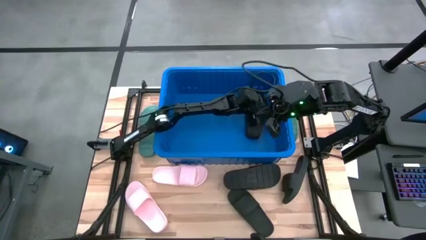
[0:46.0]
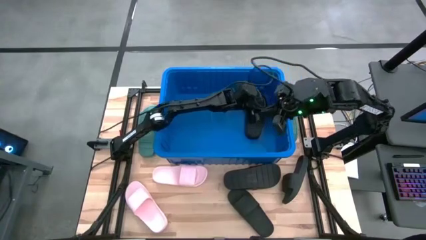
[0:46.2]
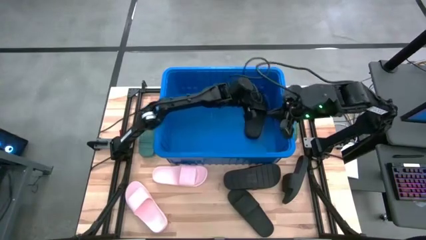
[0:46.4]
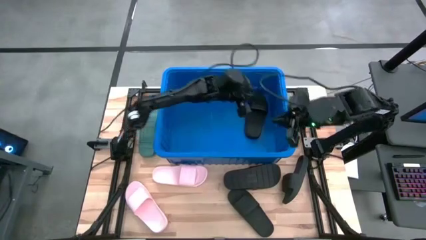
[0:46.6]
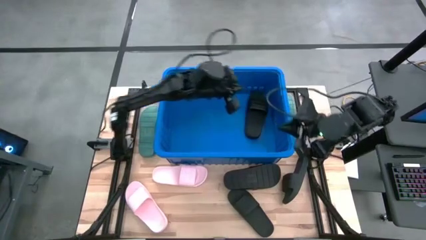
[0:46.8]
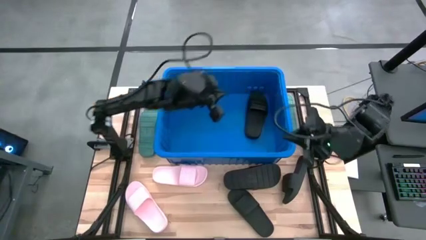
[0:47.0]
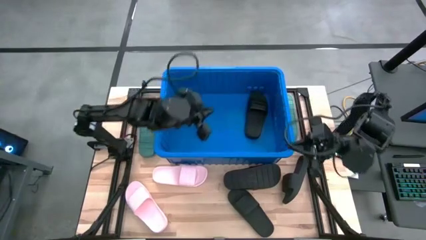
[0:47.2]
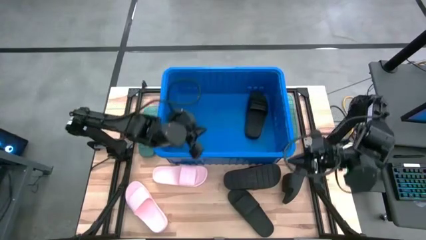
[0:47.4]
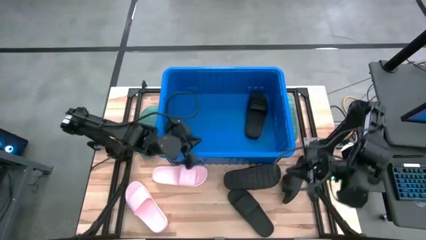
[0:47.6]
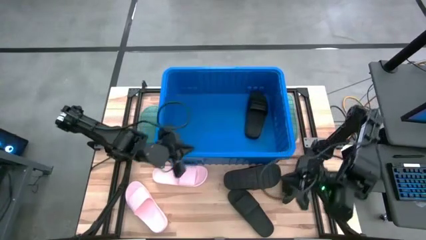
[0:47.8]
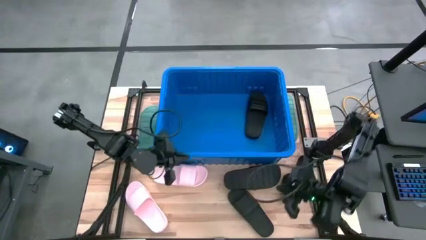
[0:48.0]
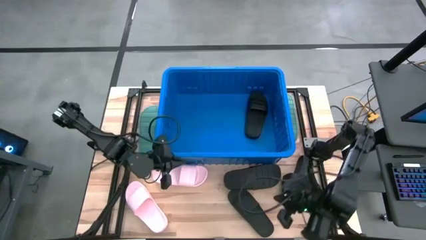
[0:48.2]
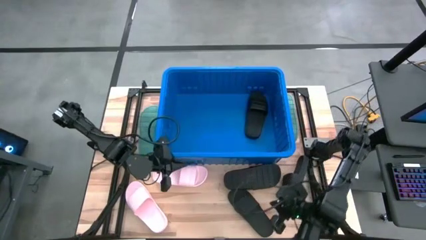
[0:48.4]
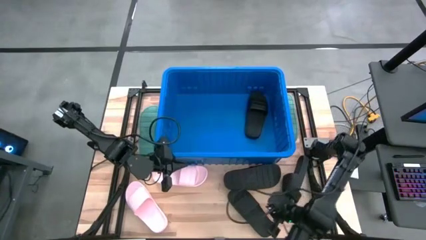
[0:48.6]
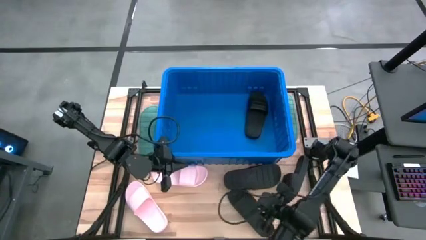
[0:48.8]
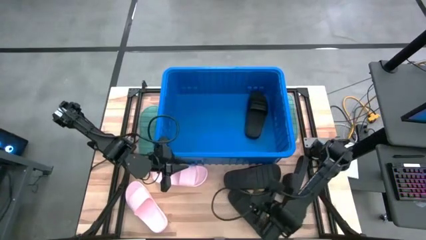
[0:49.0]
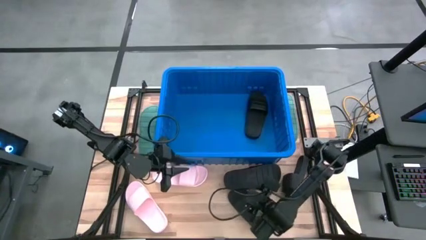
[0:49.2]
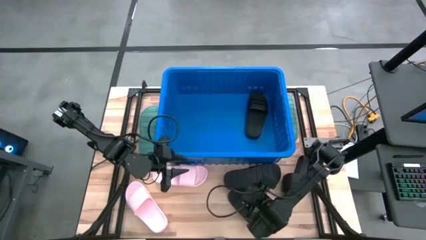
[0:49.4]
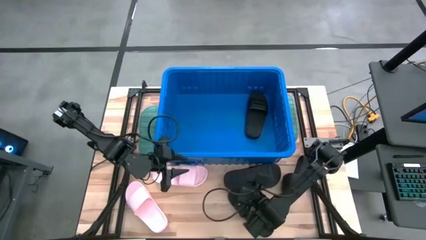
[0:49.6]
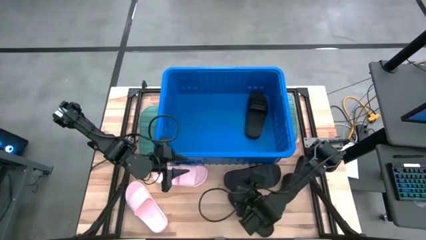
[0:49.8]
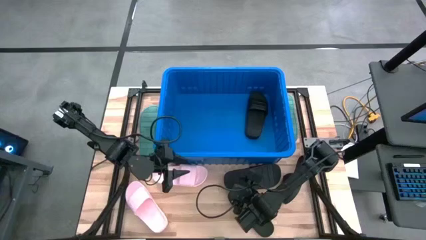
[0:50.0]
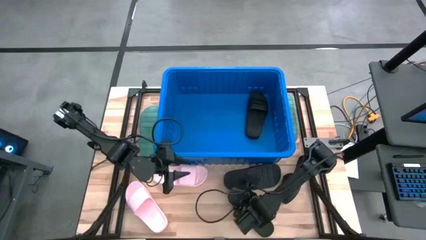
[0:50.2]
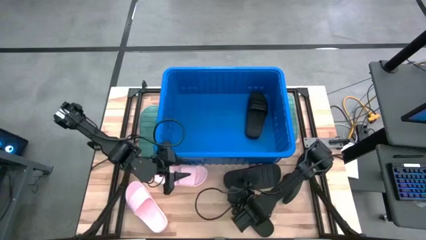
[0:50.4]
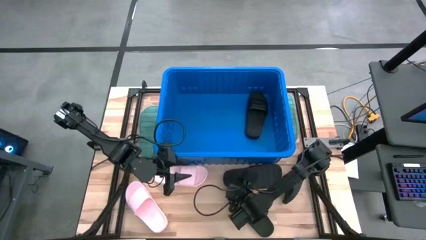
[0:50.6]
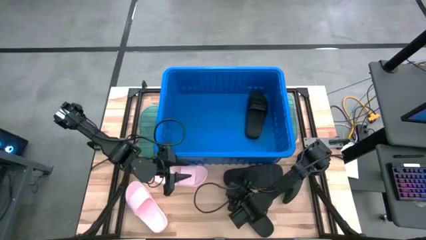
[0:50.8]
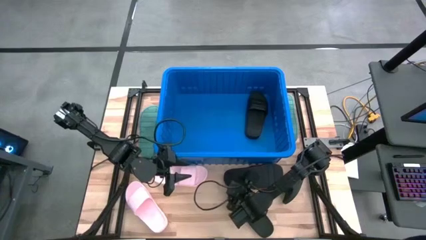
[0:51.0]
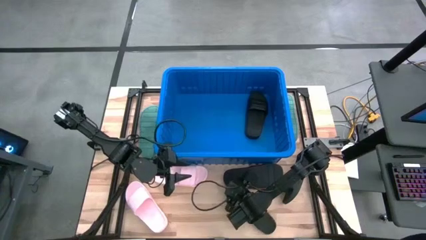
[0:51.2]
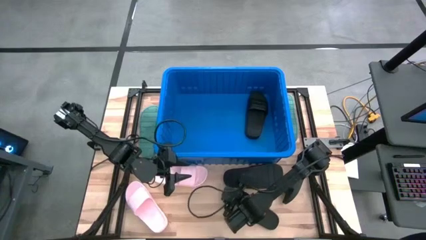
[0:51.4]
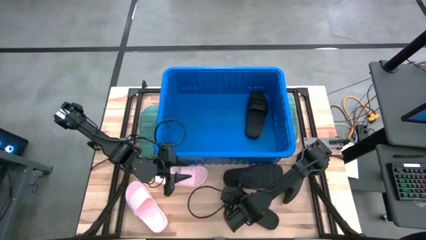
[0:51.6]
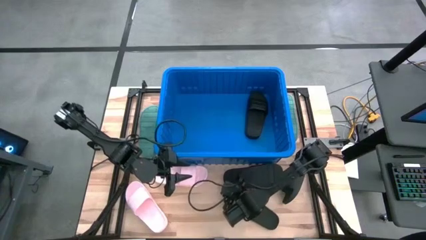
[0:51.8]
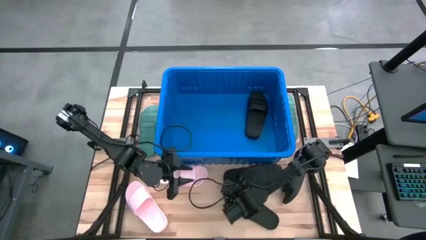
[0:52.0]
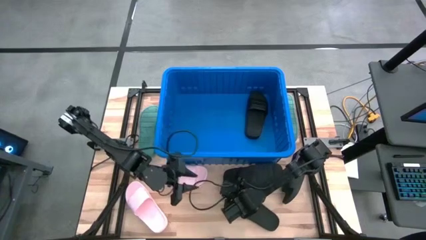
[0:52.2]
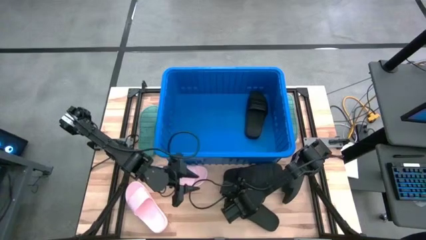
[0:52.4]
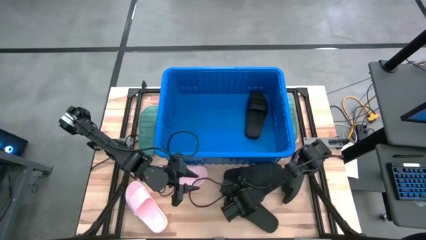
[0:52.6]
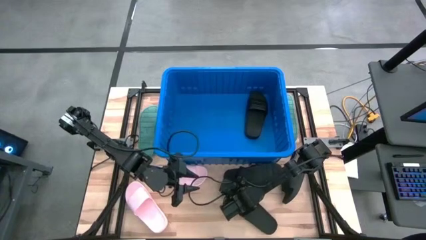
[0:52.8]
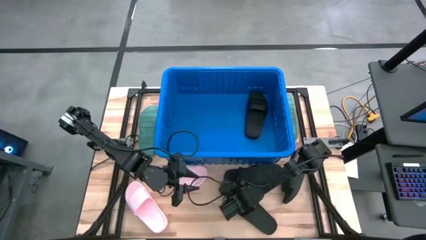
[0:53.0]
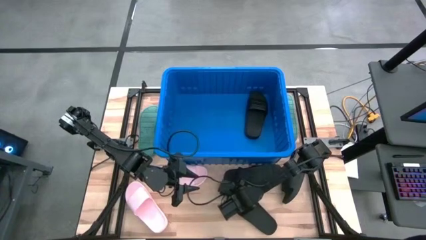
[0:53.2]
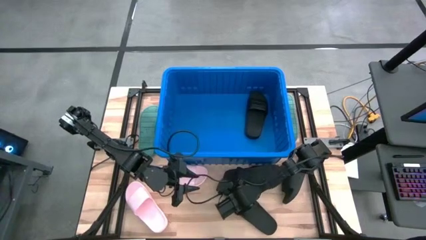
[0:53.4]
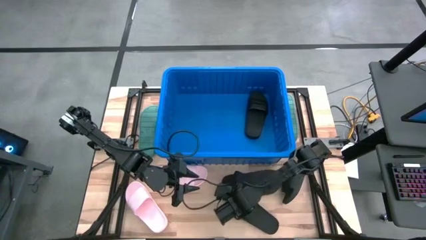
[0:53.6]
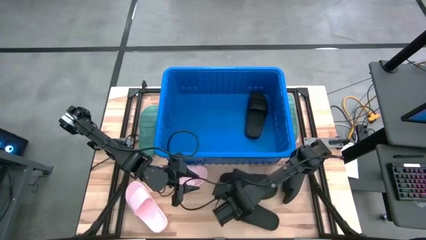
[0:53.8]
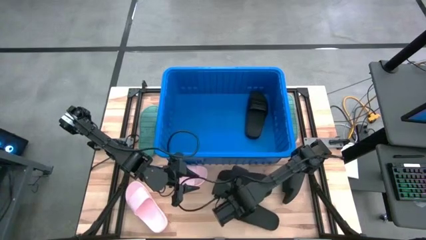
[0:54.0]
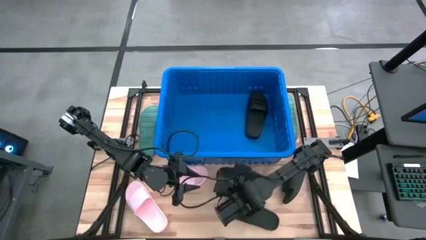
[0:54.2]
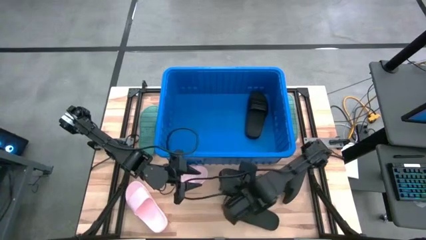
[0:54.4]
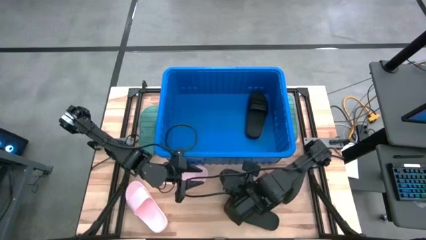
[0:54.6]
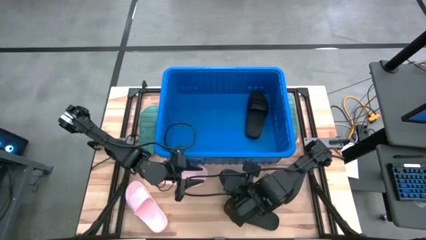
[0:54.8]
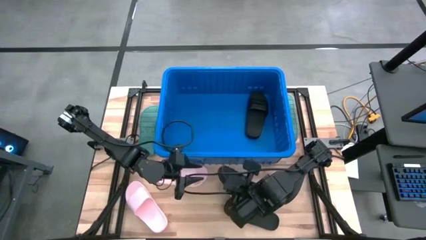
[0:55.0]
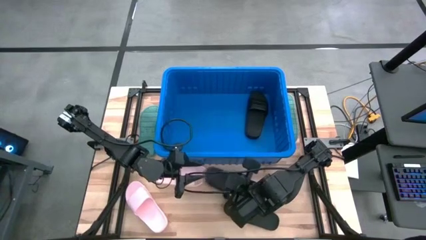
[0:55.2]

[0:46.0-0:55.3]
Task: Pick and place slides into bin
Put the black slipper into the blue bin
